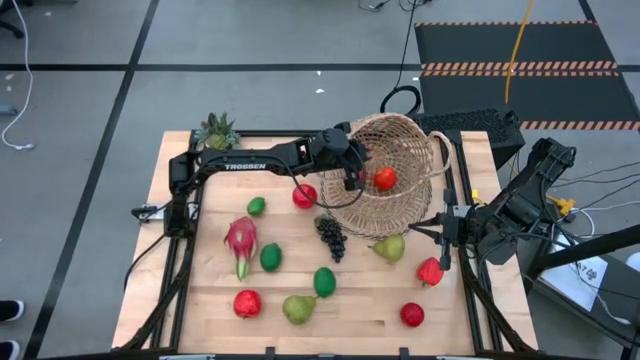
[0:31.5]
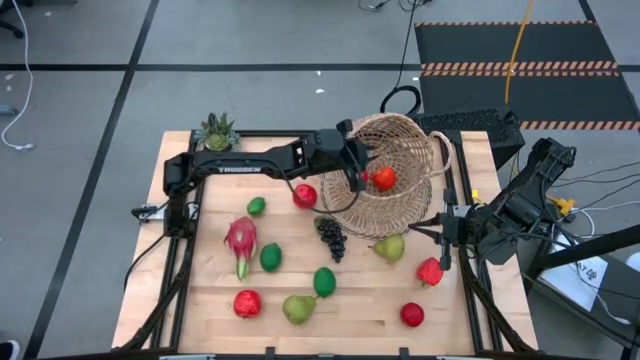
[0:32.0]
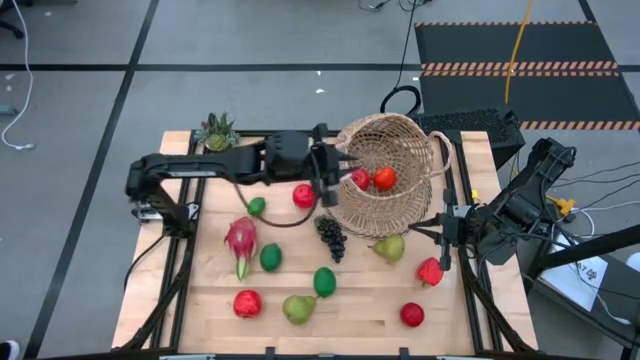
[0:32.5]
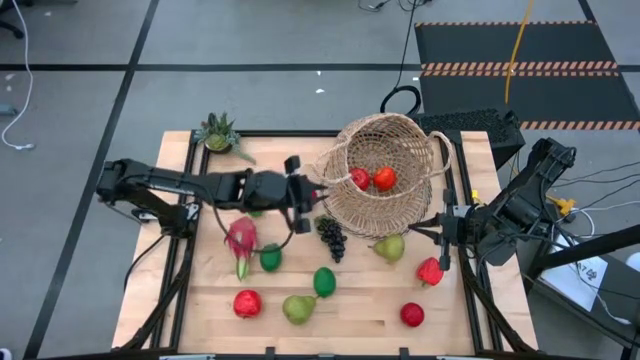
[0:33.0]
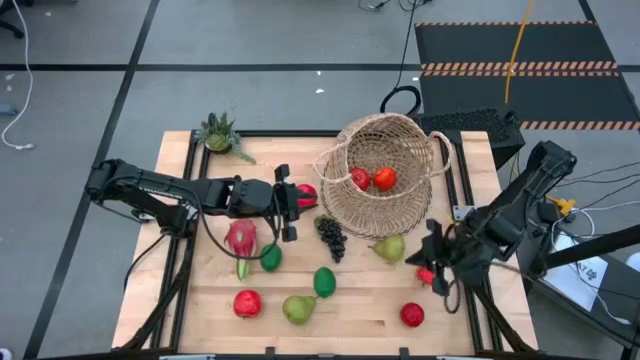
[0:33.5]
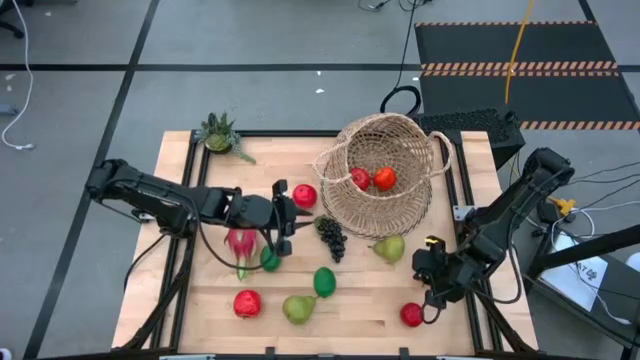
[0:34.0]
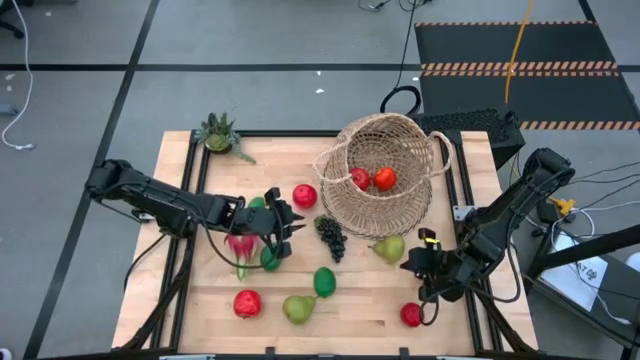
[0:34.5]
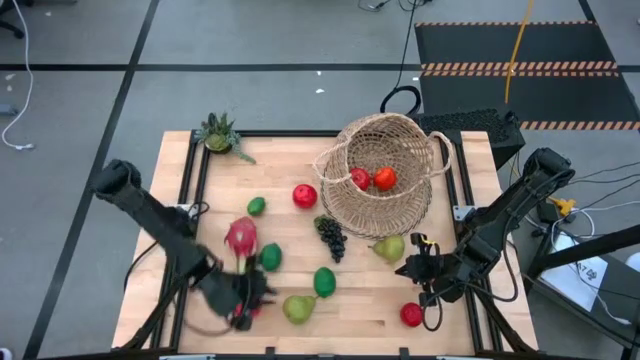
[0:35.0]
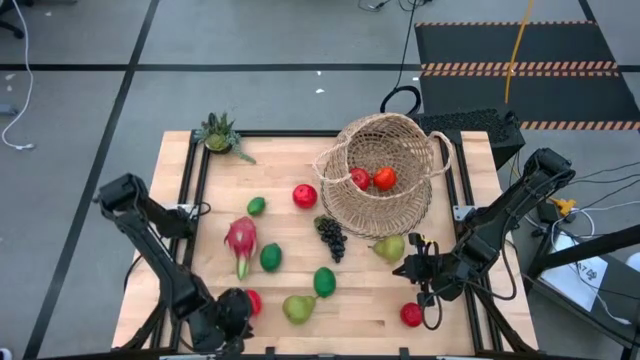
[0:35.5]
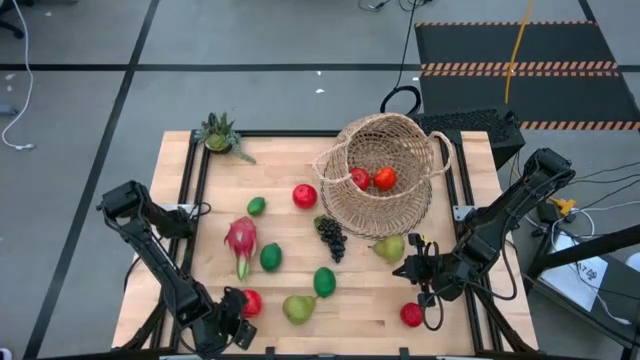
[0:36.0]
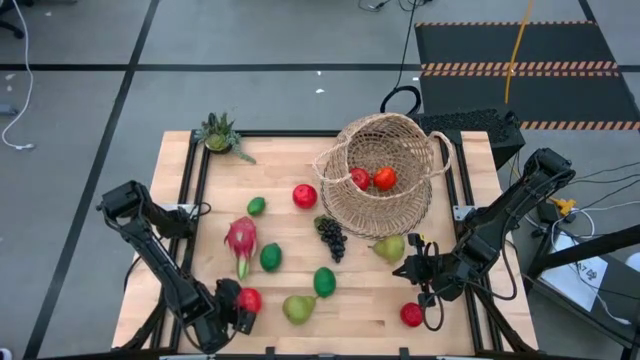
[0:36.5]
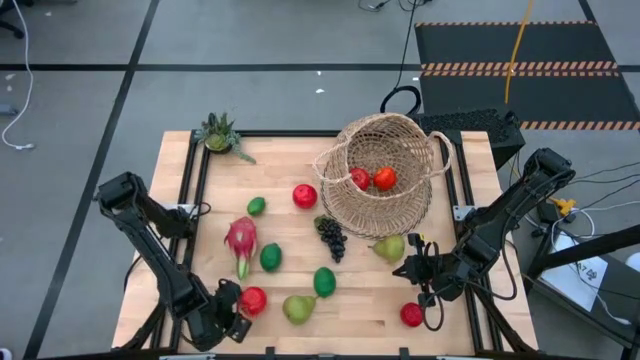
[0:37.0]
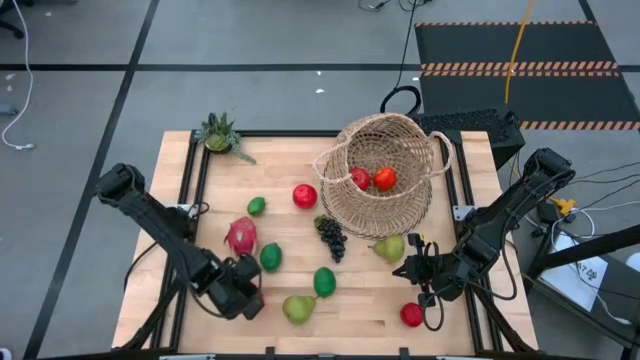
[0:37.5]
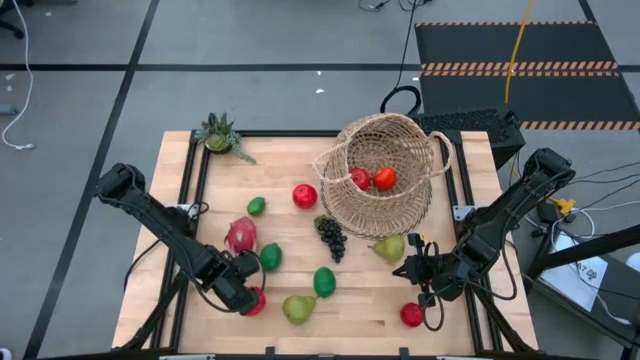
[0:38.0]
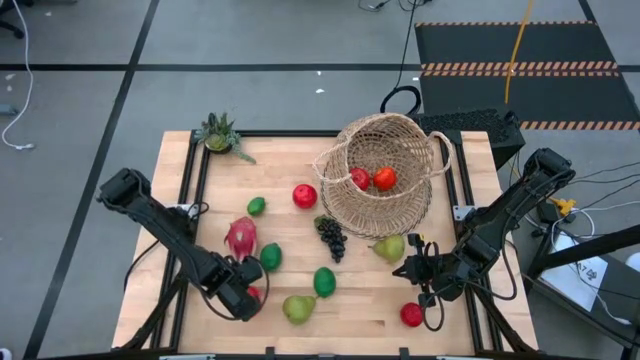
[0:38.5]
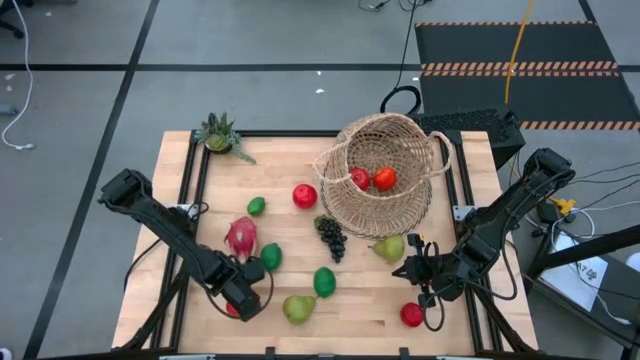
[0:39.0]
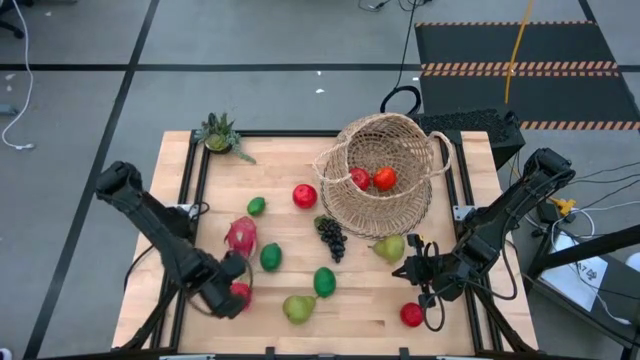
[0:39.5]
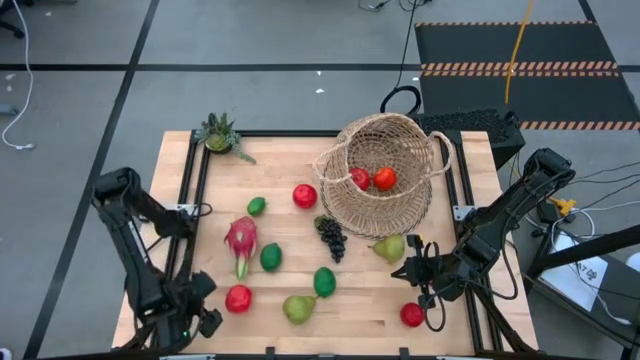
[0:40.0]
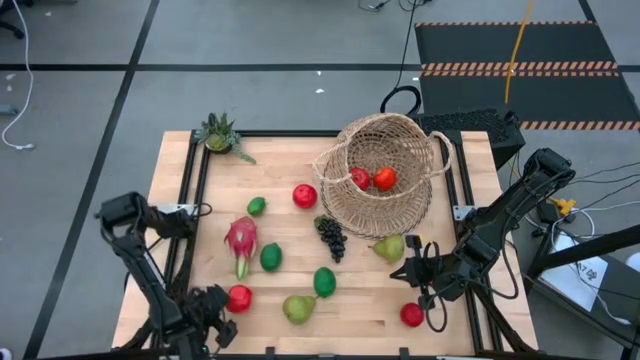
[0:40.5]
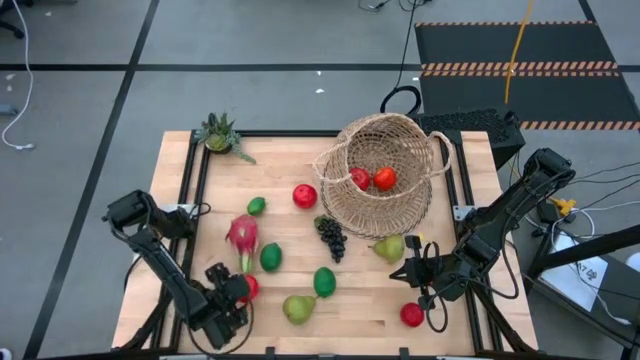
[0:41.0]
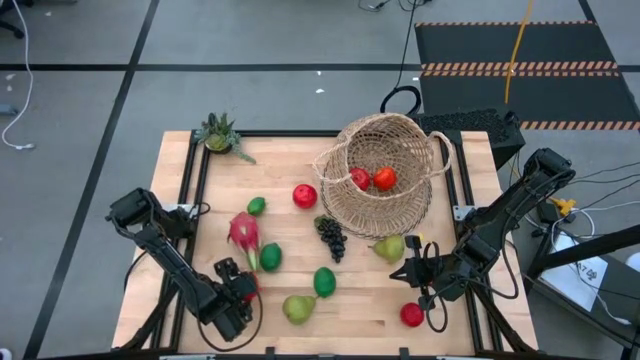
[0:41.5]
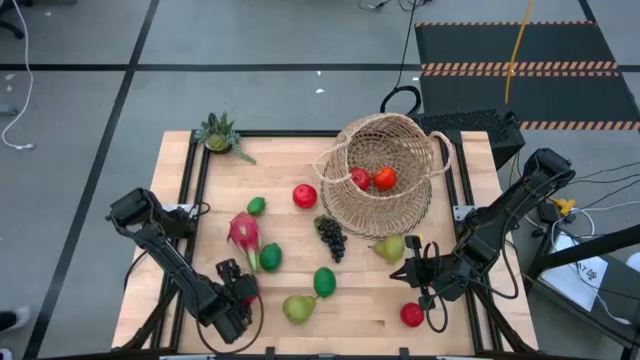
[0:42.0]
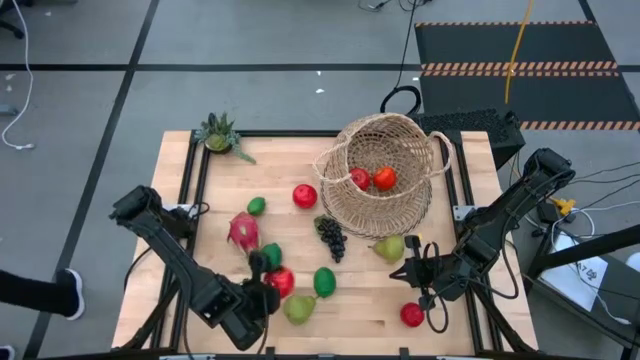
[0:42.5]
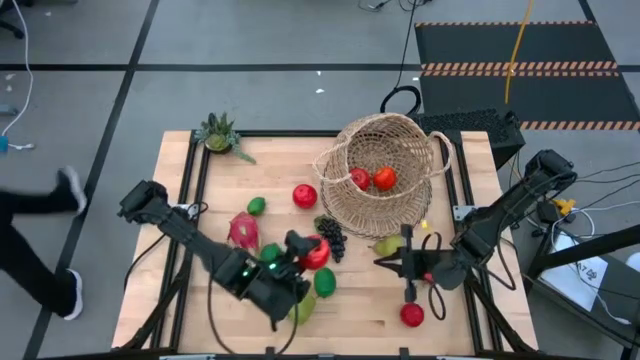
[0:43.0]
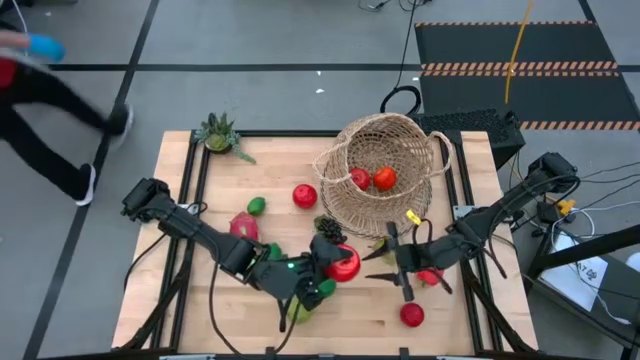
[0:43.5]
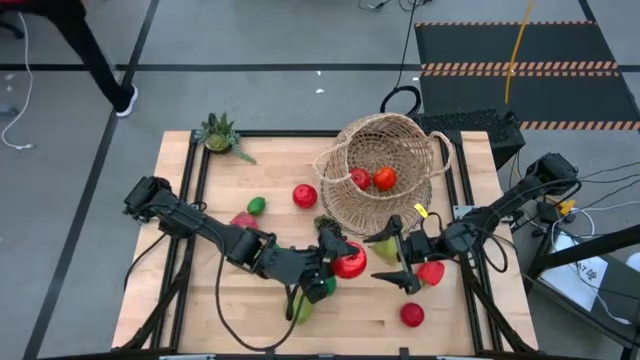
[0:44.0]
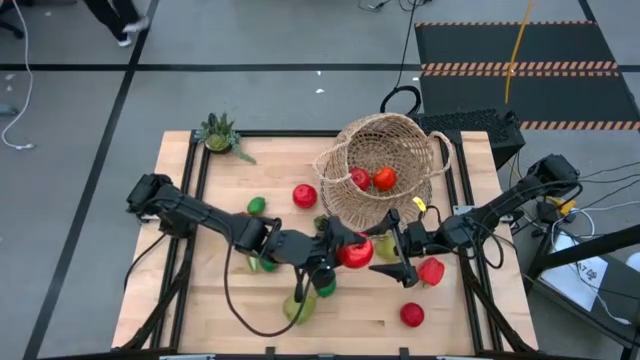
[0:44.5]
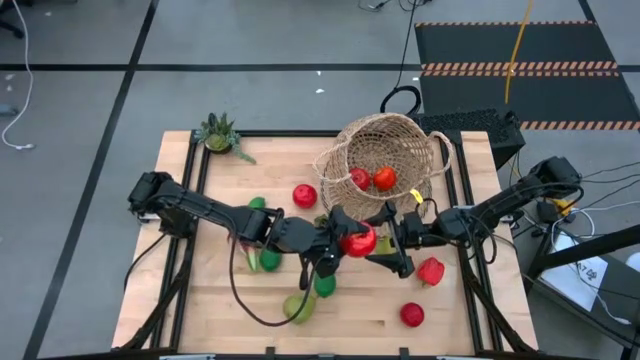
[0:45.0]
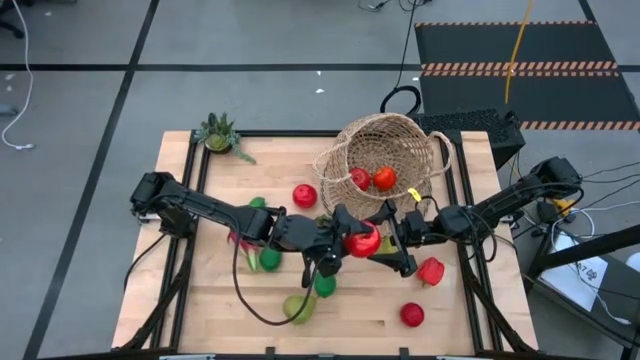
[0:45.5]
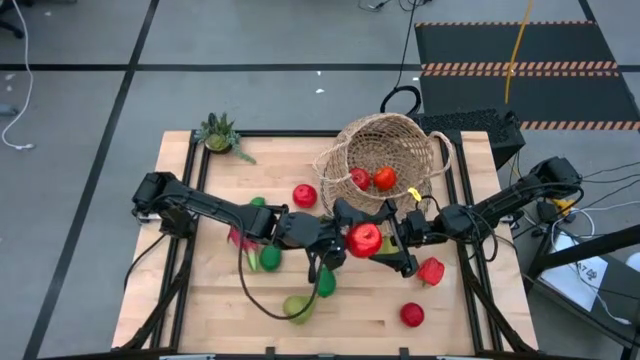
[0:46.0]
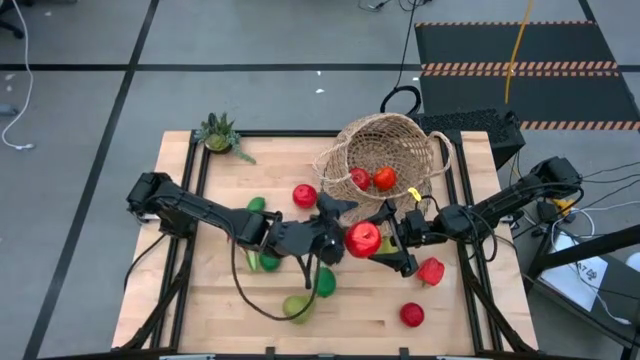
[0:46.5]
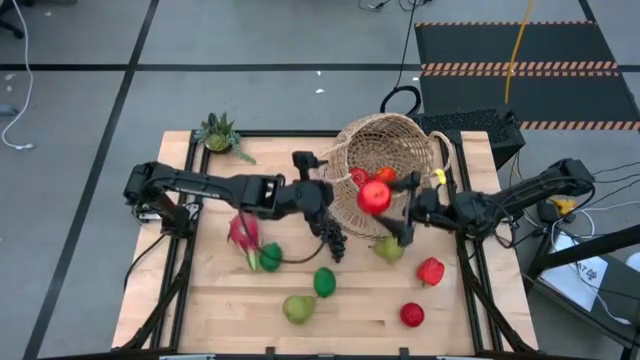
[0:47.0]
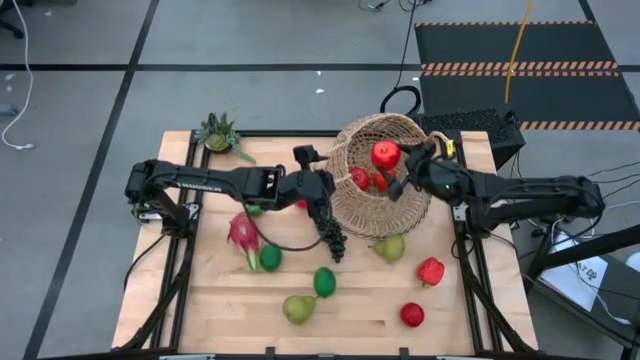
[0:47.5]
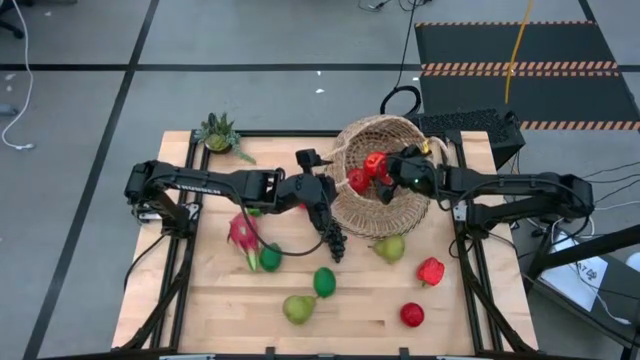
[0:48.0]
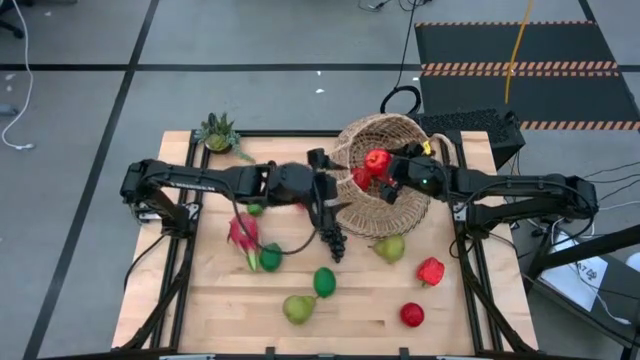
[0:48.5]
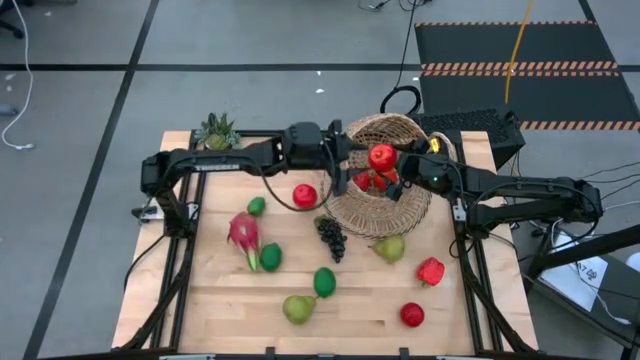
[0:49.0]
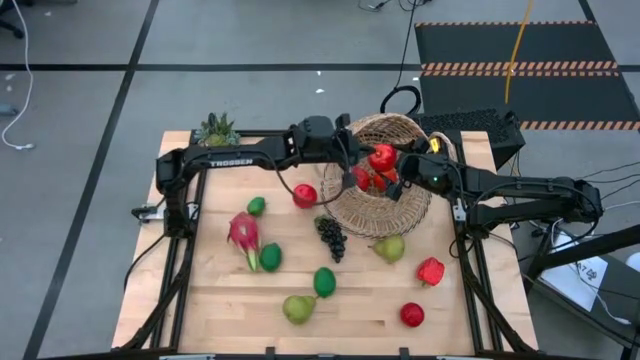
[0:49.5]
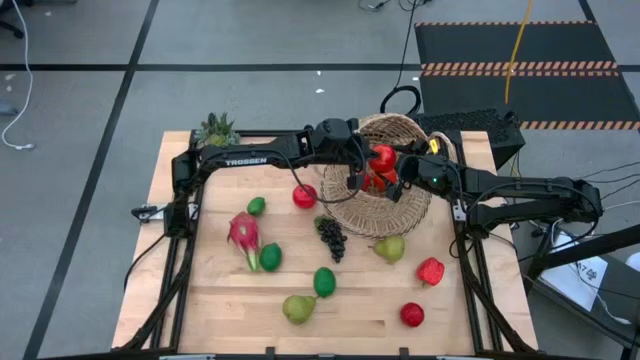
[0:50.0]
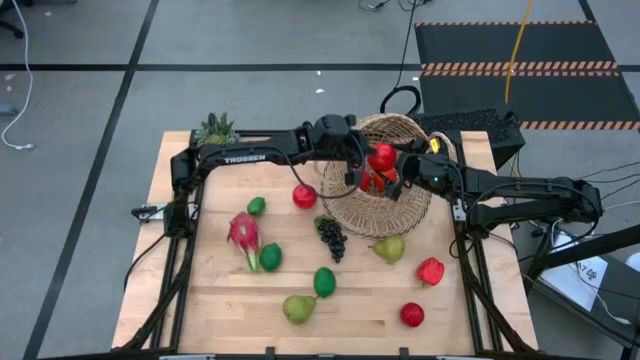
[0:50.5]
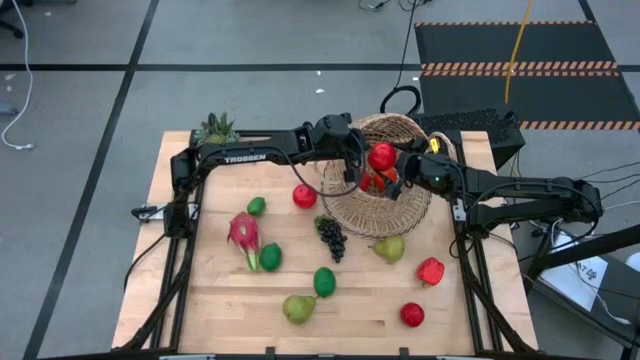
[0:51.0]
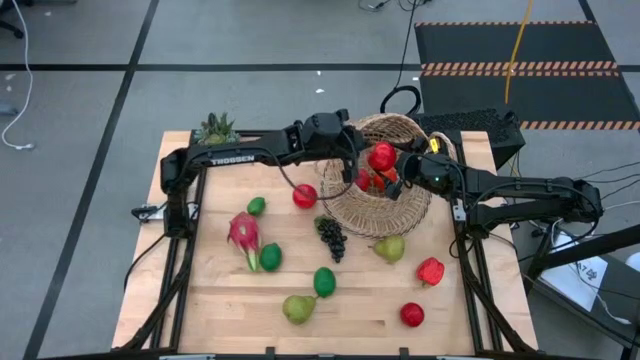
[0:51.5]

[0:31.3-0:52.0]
Task: Build produce basket
Put the red apple into the brown basket
